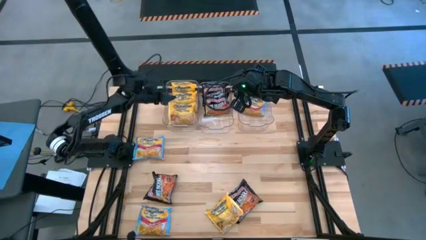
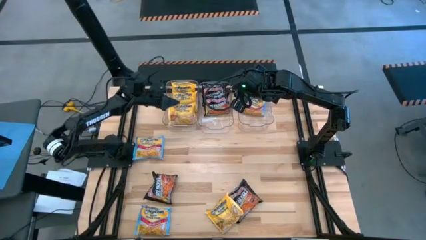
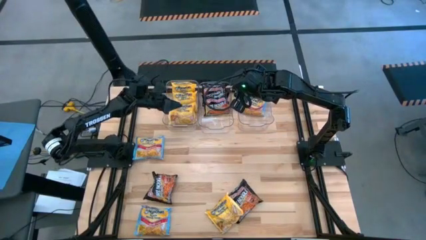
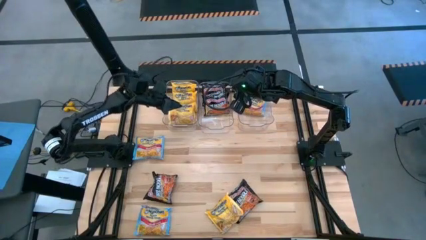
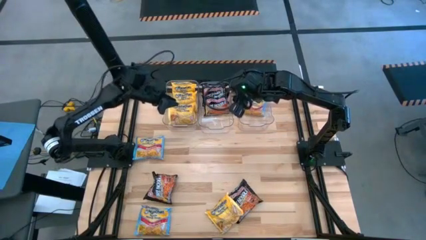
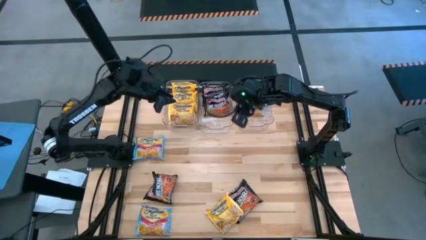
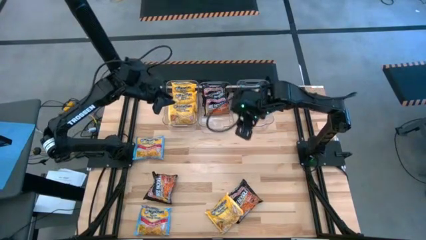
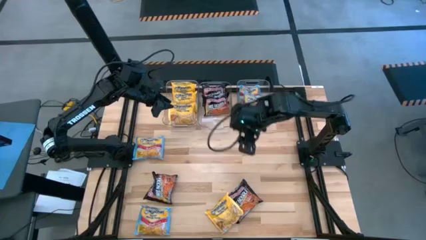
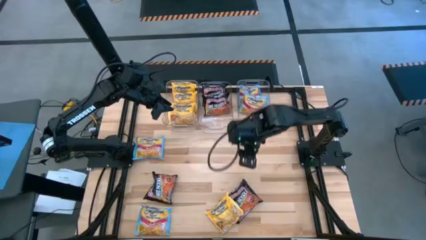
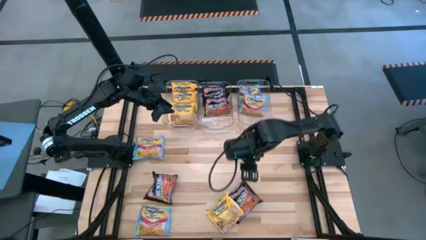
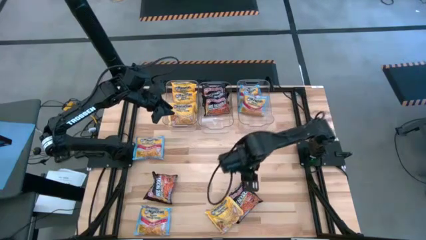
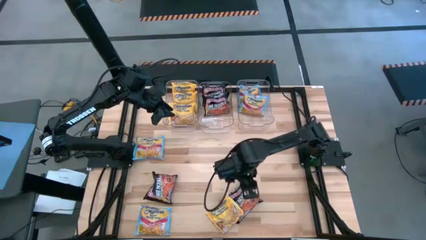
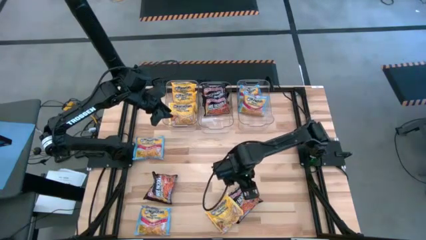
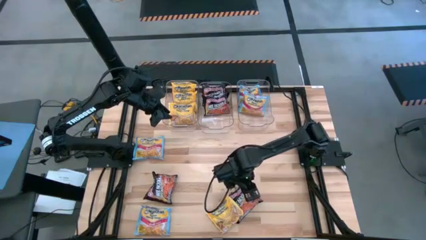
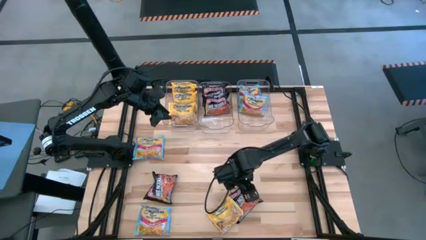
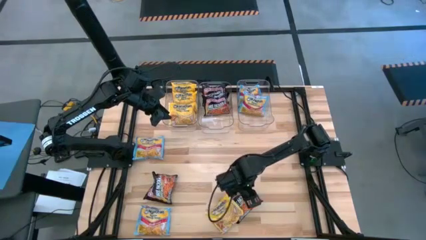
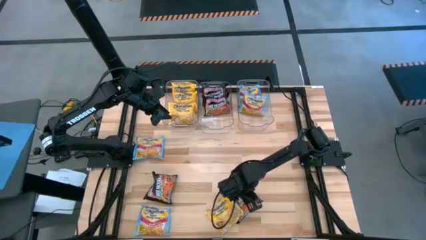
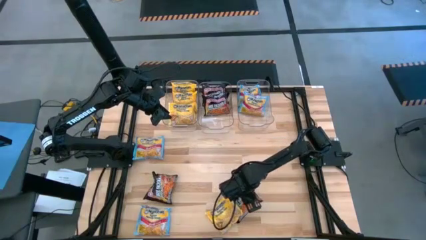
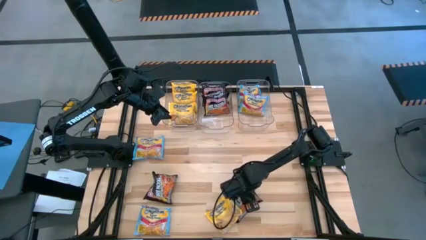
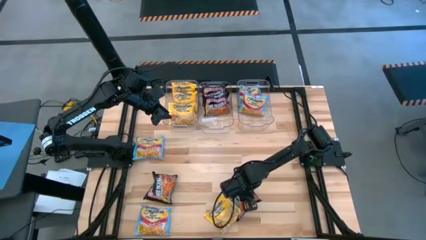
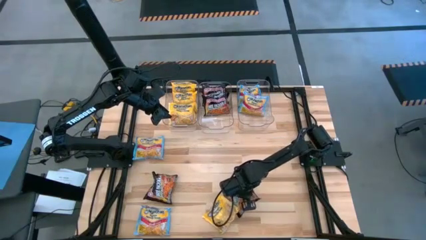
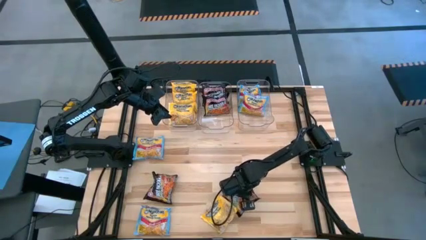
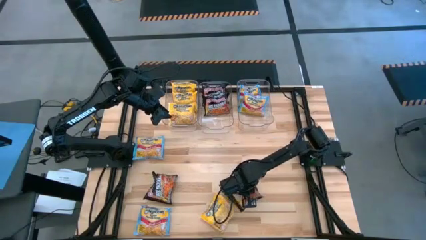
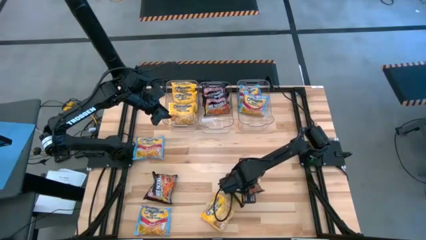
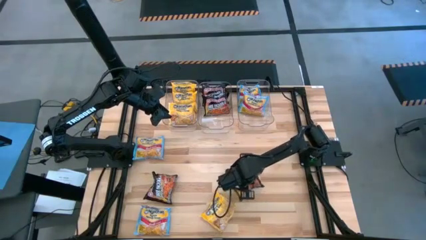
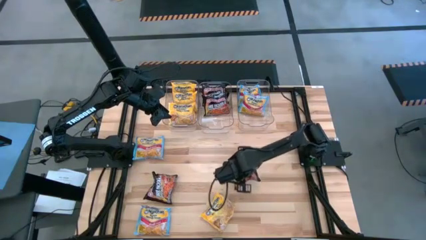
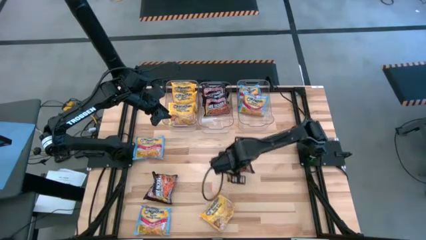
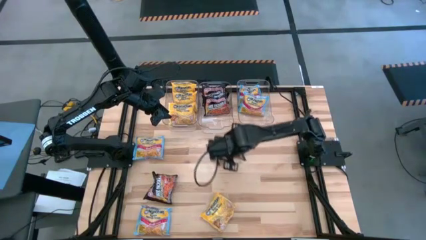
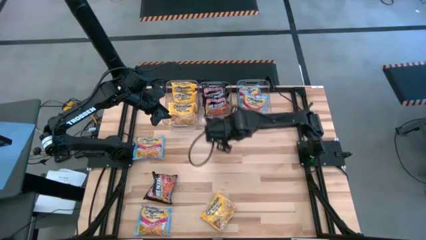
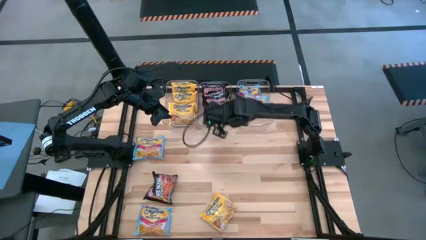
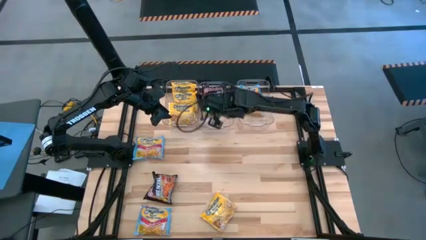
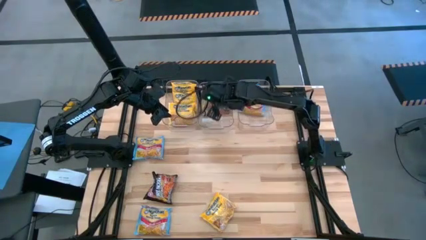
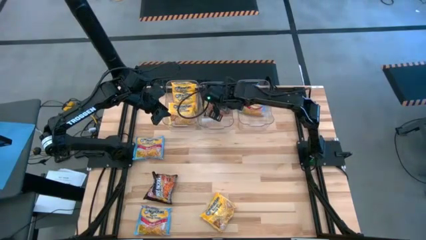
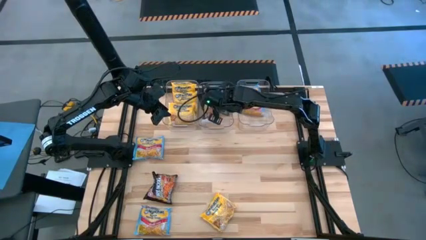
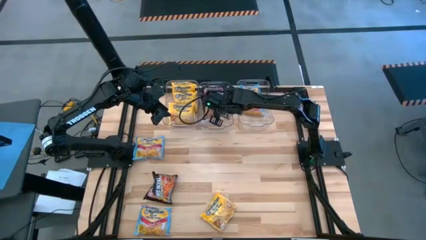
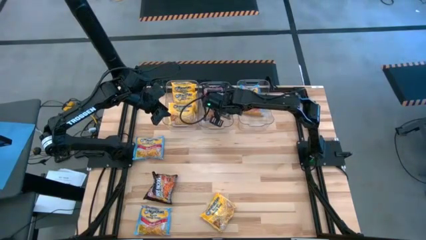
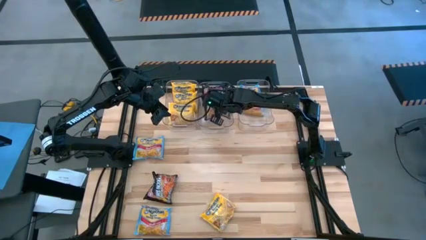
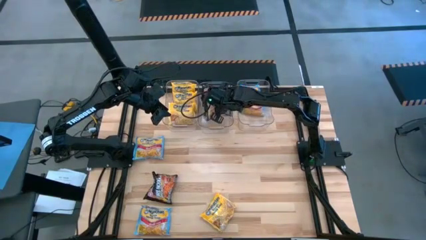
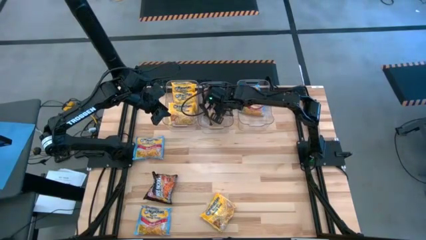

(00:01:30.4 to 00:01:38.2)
Task: Sort Maruchan noodles
Put the black noodle pack in the middle transparent bin

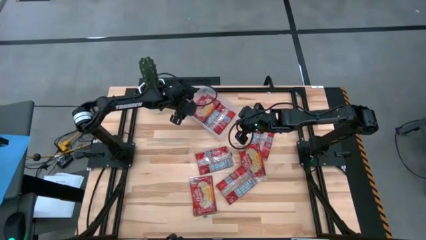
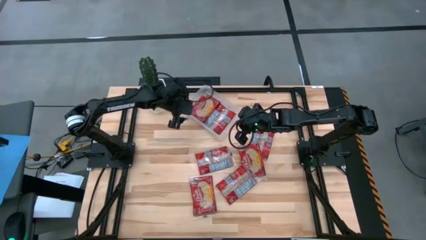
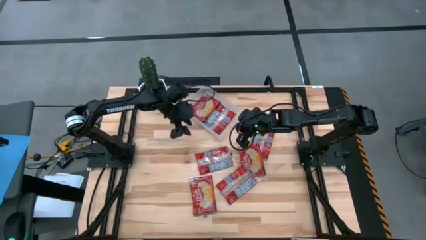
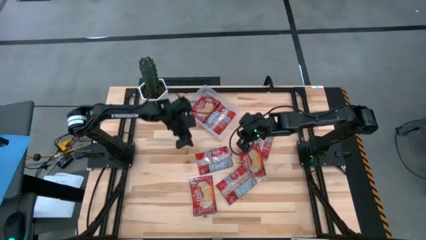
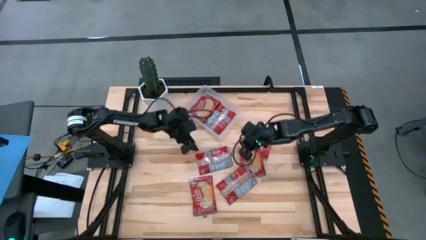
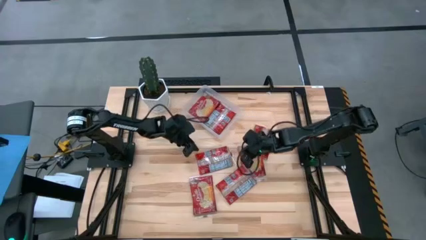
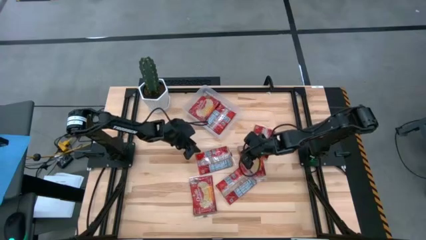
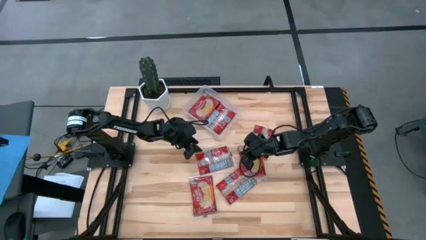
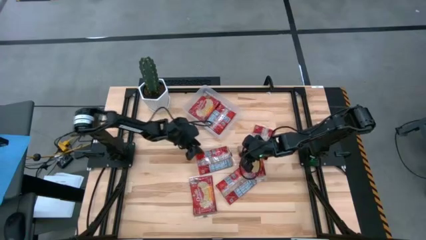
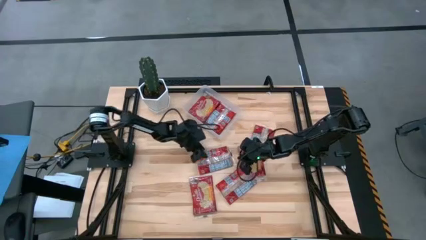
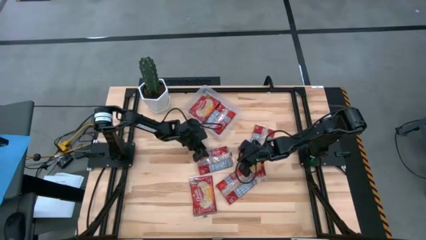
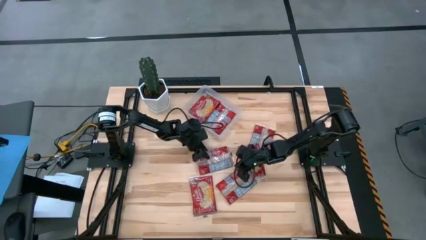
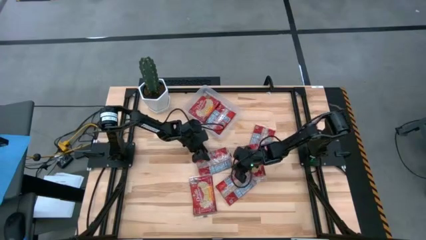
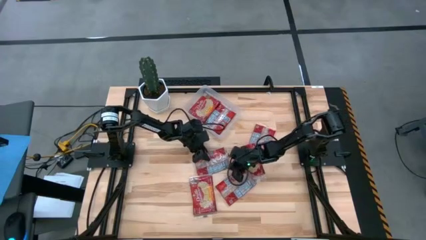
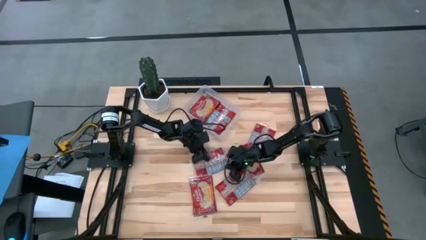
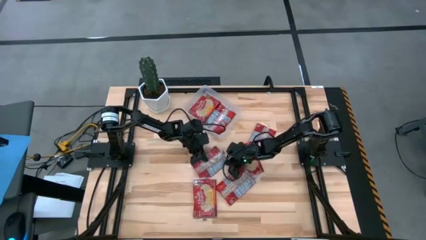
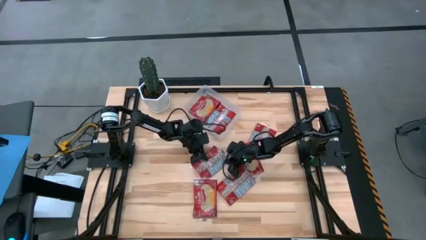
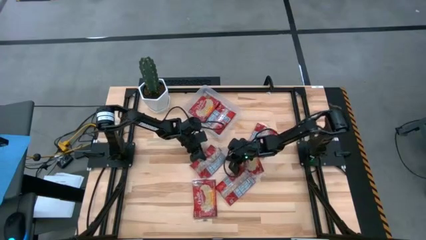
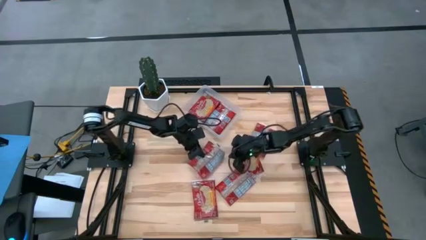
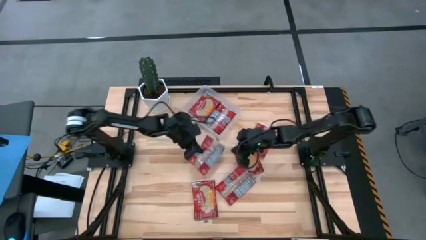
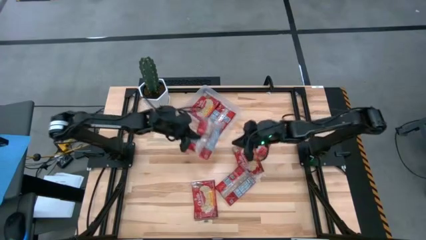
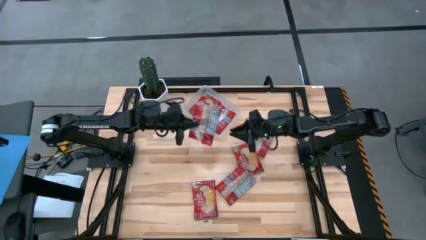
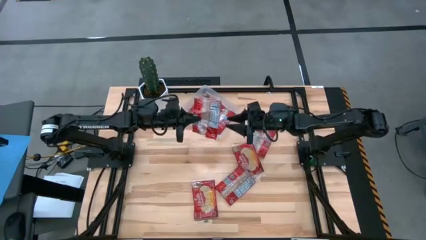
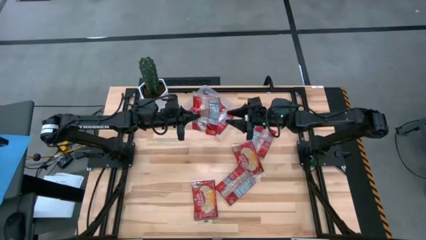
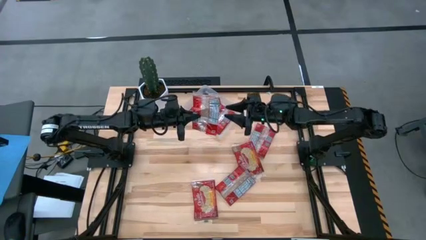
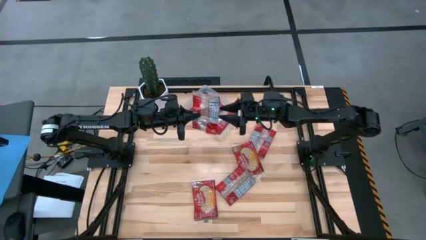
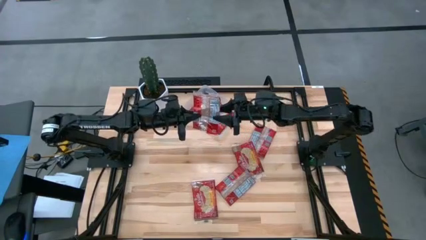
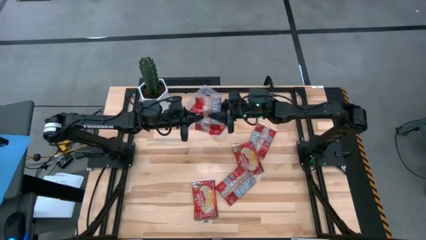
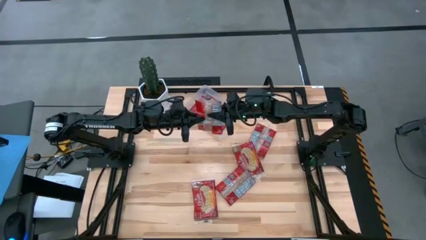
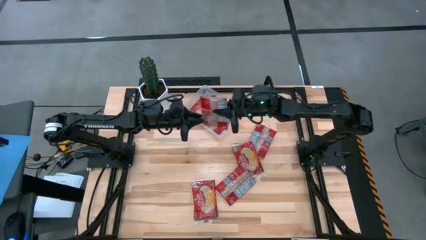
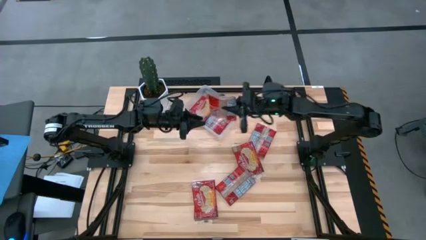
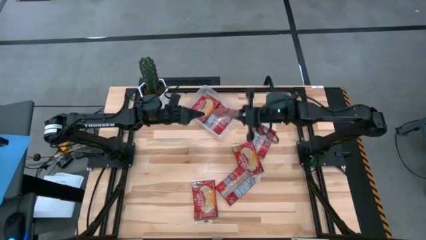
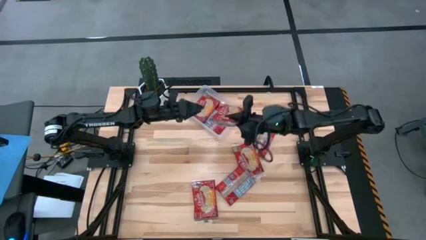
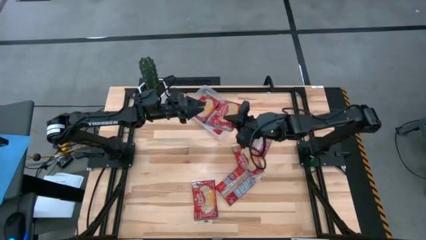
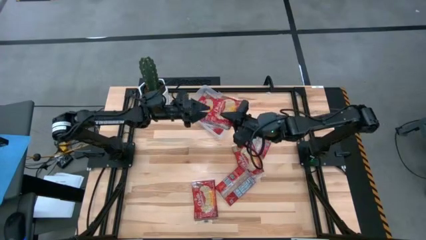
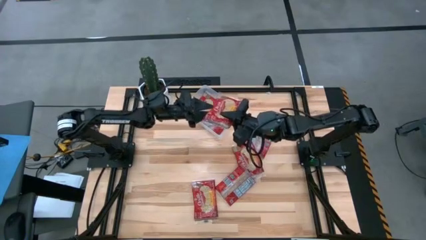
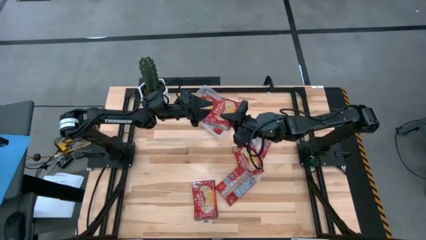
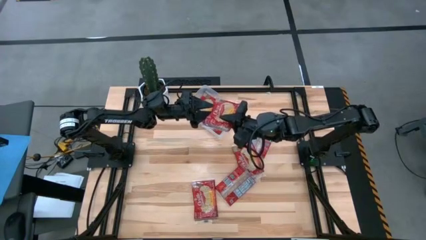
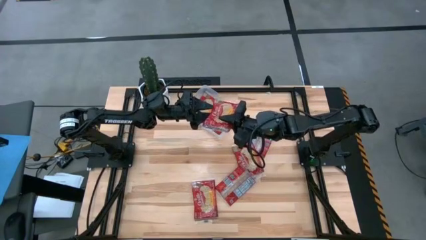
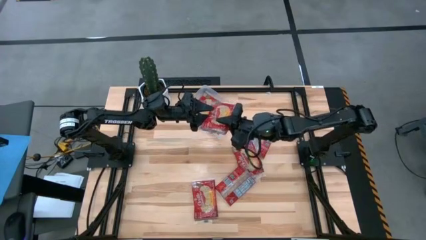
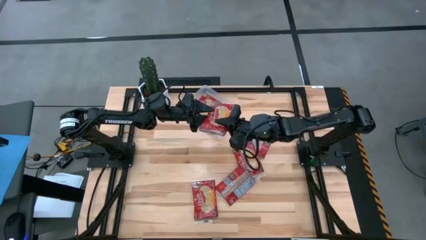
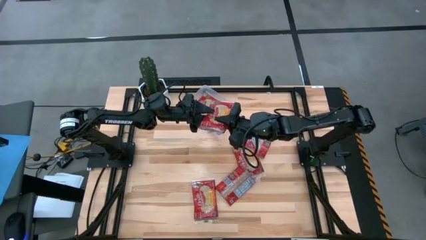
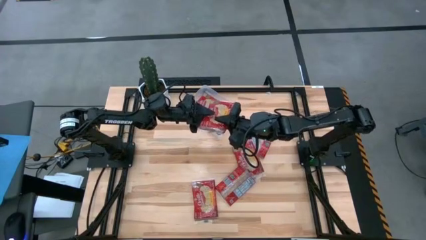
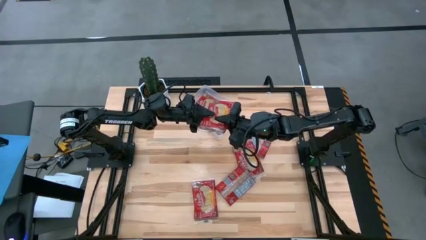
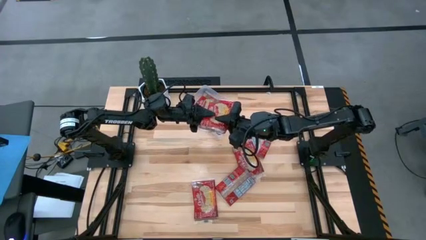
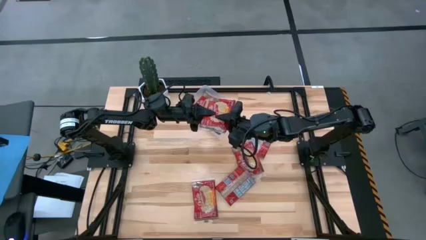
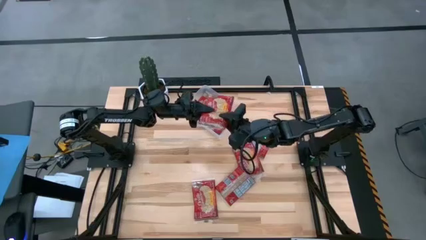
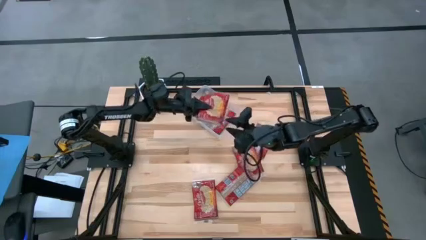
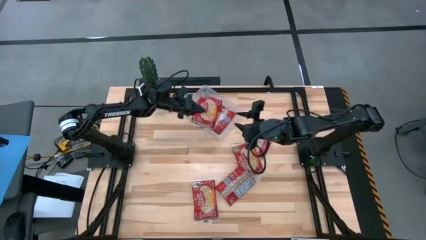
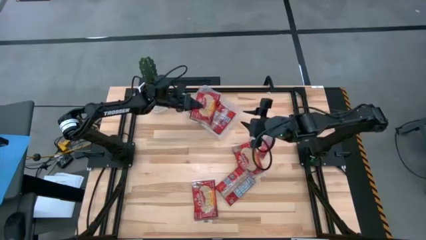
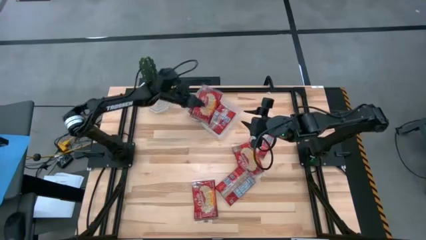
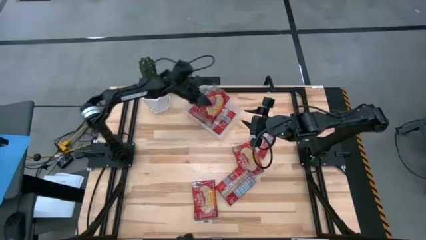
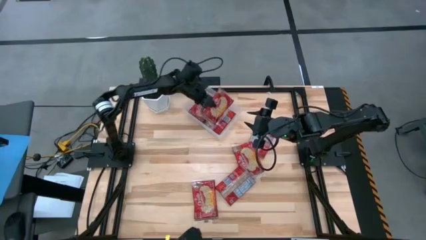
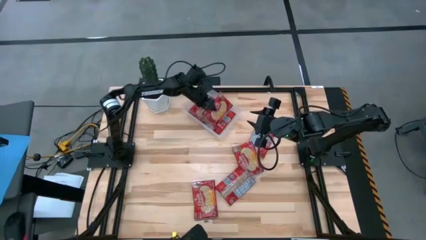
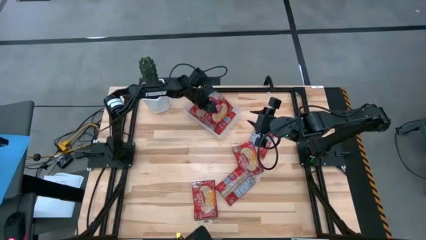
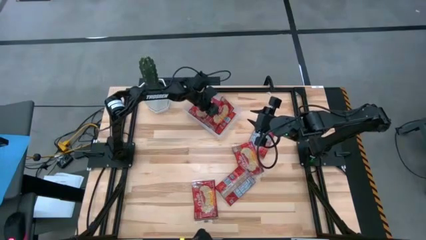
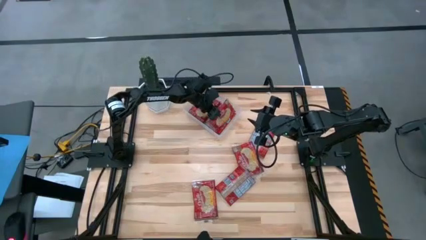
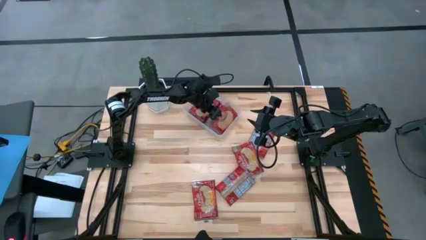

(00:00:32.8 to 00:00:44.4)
Task: Sort popcorn bags into baskets
Put the red popcorn bag into the transparent bin
